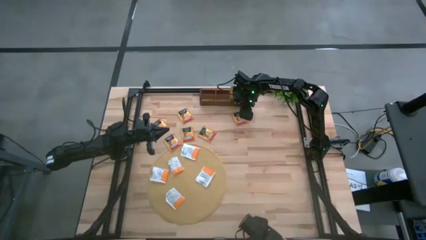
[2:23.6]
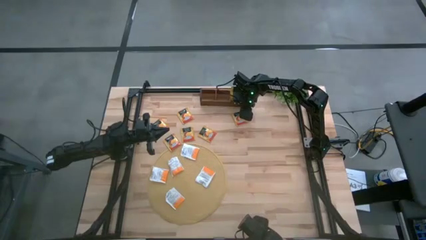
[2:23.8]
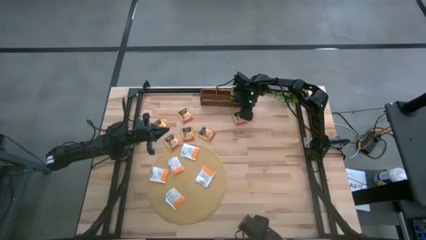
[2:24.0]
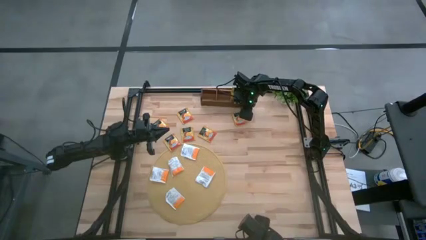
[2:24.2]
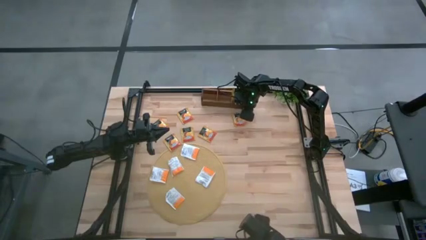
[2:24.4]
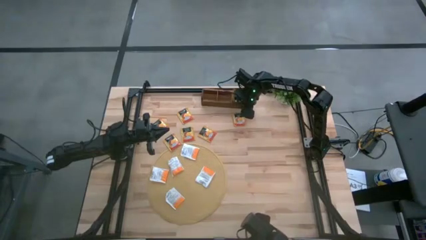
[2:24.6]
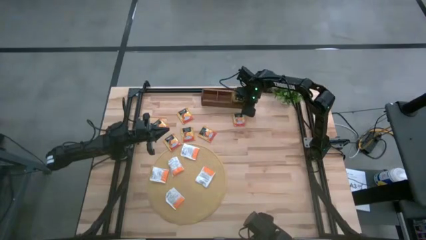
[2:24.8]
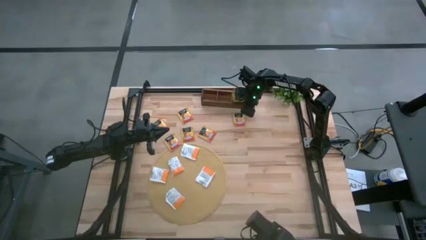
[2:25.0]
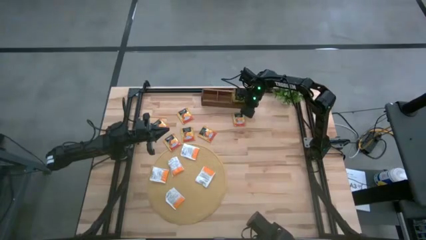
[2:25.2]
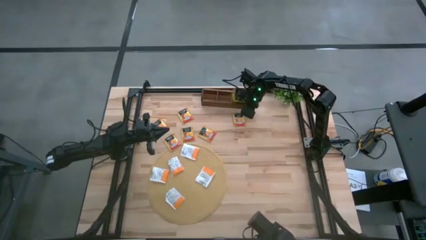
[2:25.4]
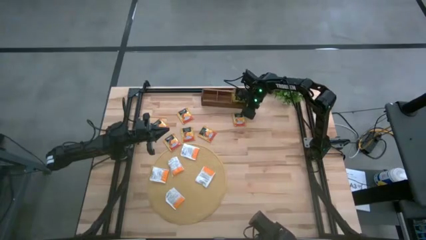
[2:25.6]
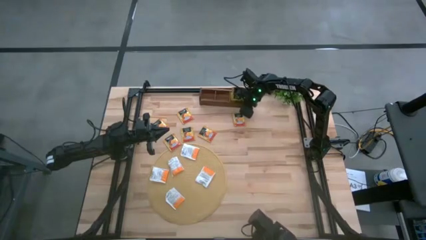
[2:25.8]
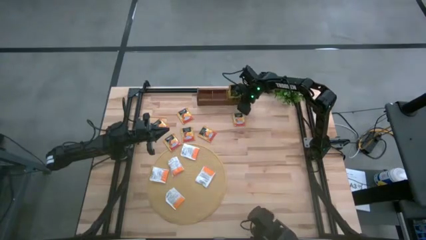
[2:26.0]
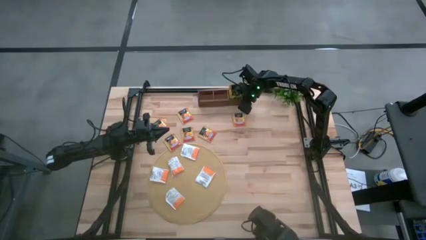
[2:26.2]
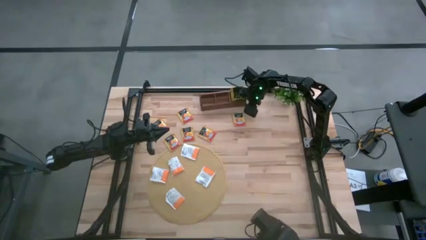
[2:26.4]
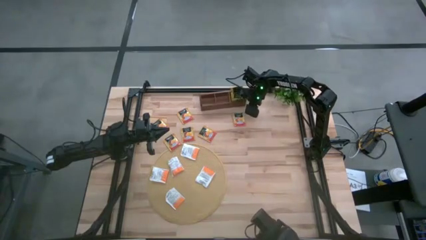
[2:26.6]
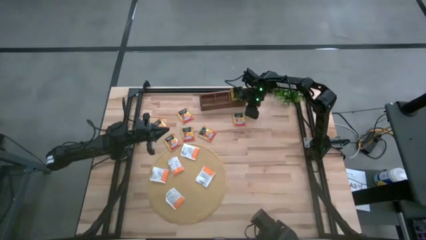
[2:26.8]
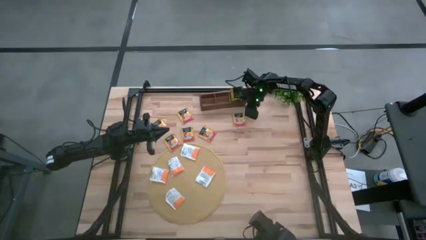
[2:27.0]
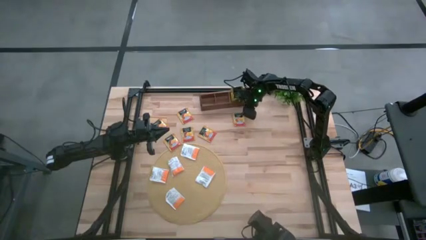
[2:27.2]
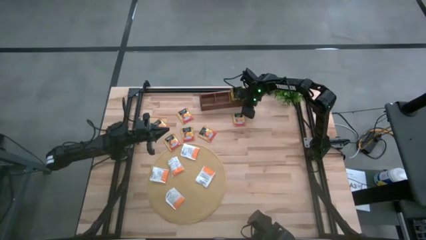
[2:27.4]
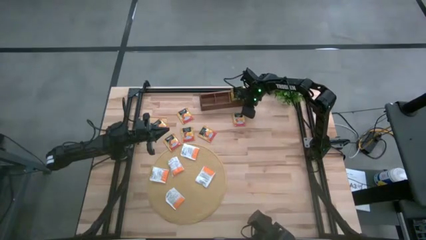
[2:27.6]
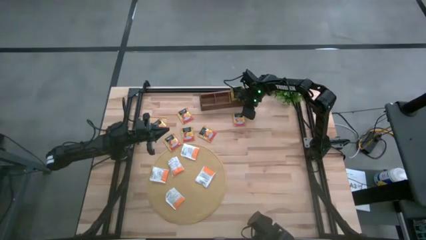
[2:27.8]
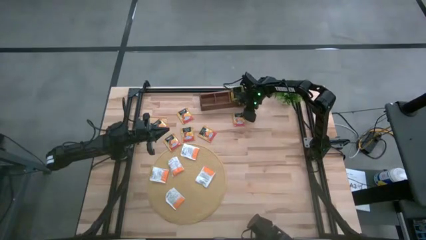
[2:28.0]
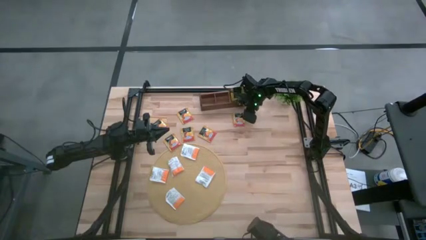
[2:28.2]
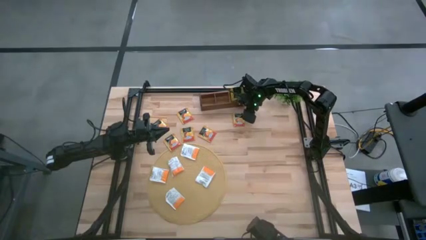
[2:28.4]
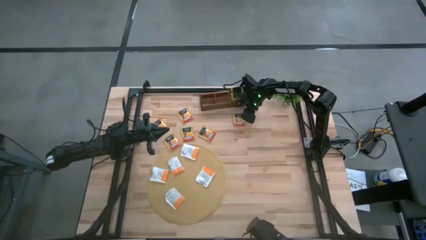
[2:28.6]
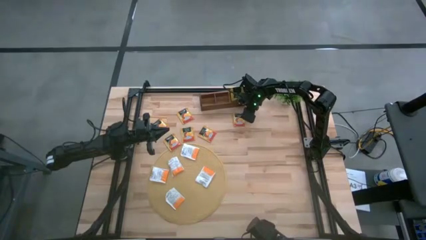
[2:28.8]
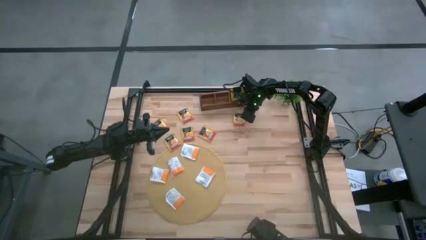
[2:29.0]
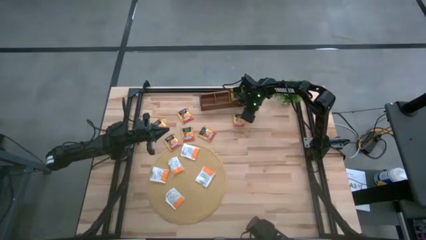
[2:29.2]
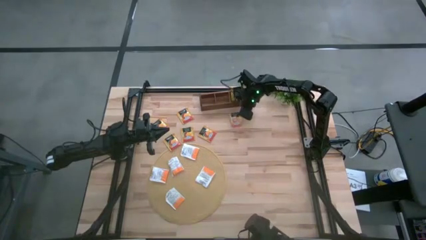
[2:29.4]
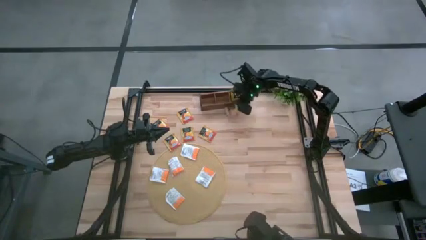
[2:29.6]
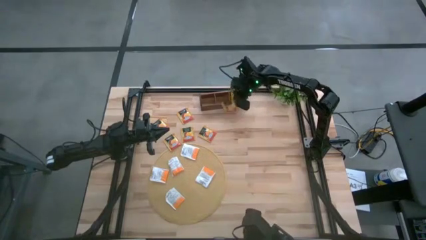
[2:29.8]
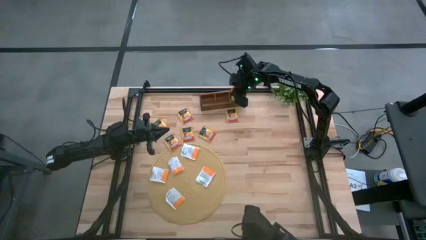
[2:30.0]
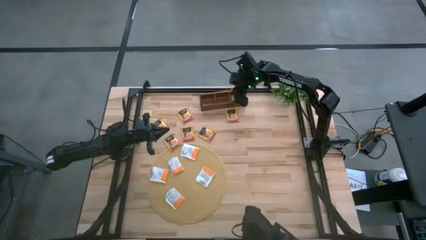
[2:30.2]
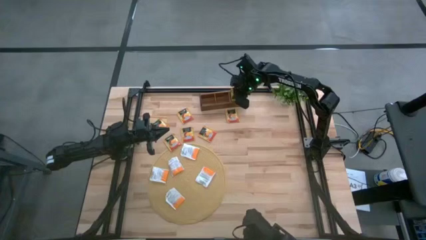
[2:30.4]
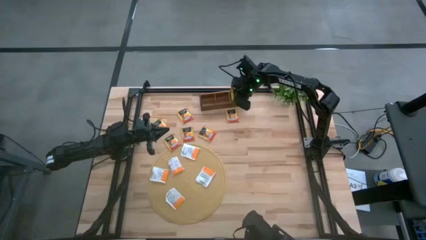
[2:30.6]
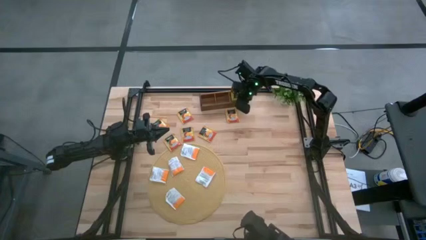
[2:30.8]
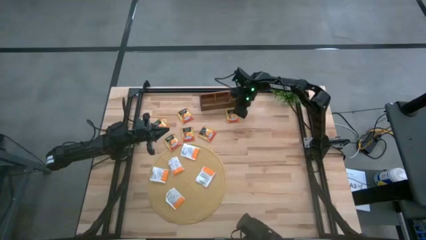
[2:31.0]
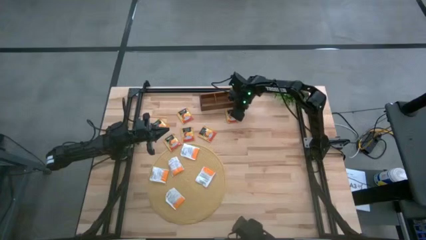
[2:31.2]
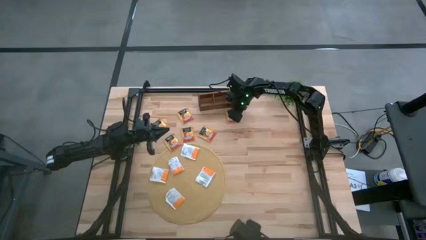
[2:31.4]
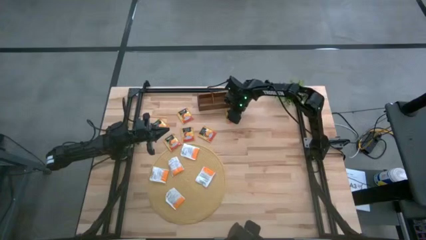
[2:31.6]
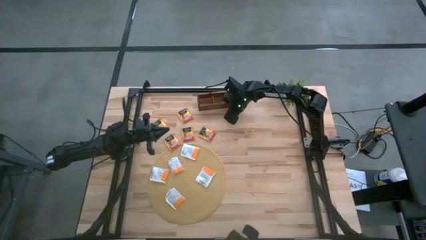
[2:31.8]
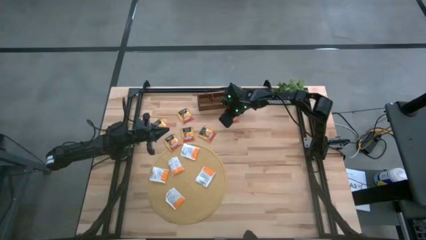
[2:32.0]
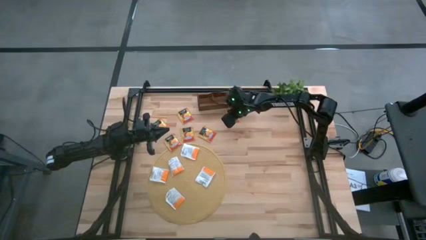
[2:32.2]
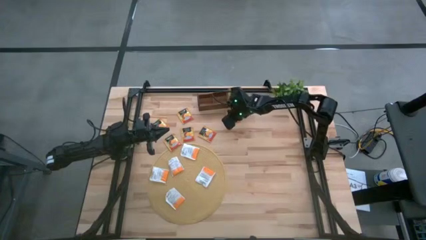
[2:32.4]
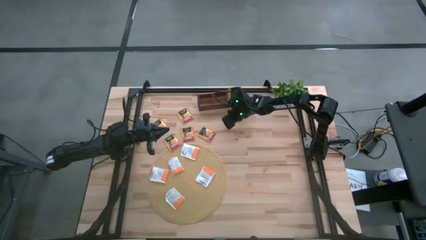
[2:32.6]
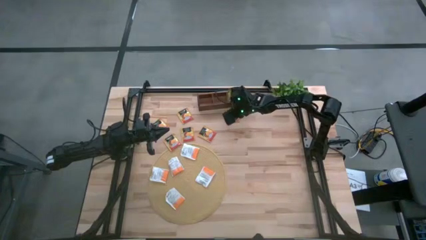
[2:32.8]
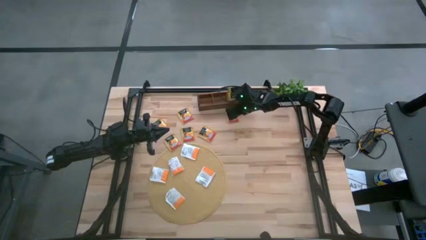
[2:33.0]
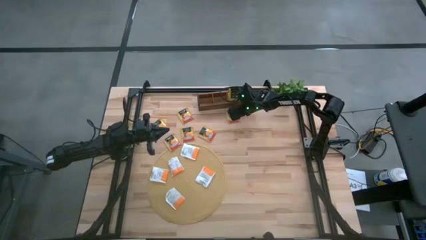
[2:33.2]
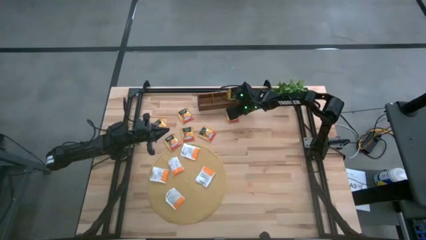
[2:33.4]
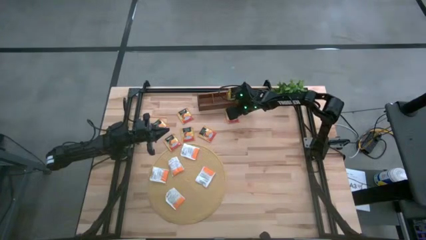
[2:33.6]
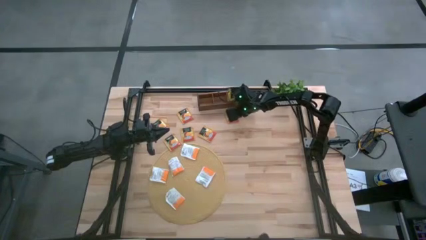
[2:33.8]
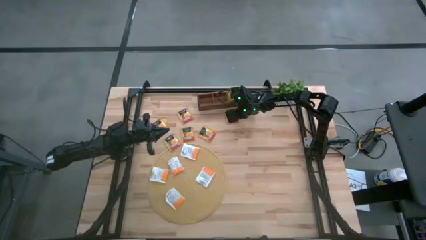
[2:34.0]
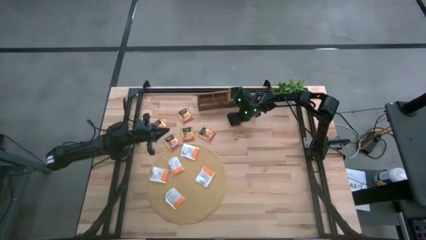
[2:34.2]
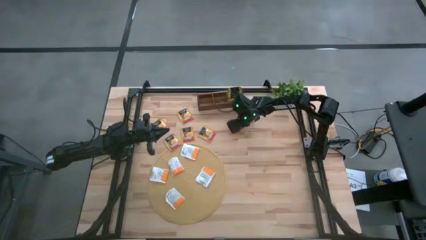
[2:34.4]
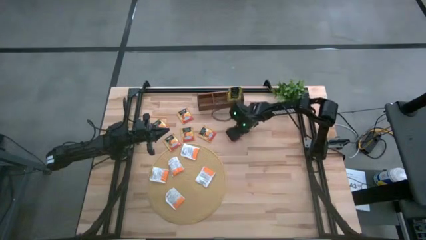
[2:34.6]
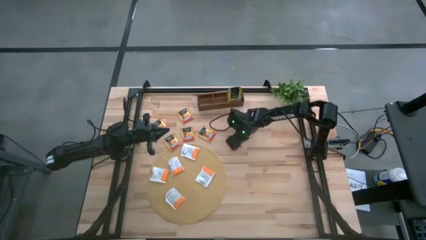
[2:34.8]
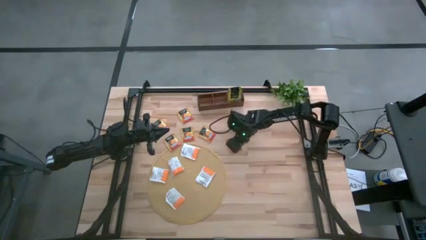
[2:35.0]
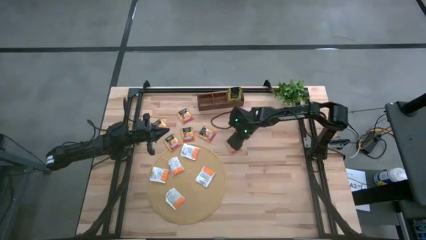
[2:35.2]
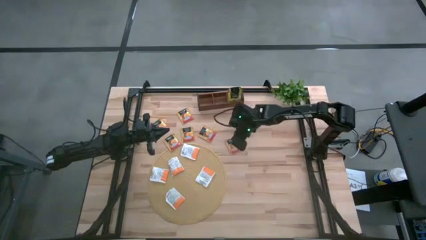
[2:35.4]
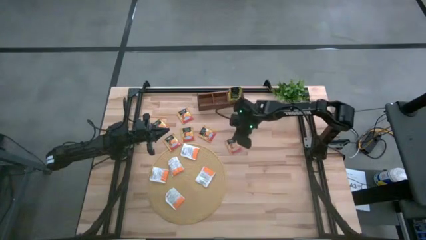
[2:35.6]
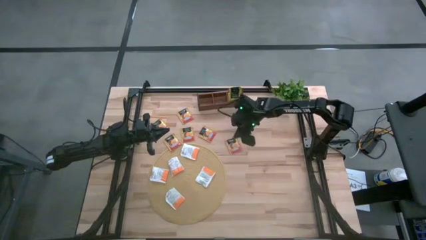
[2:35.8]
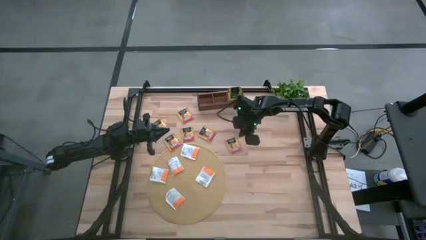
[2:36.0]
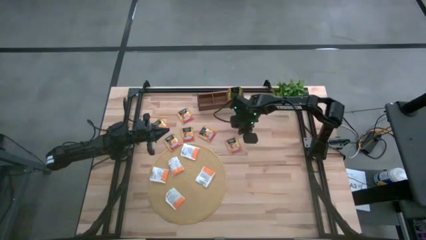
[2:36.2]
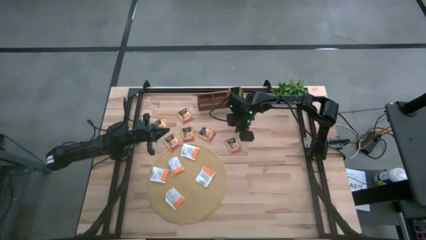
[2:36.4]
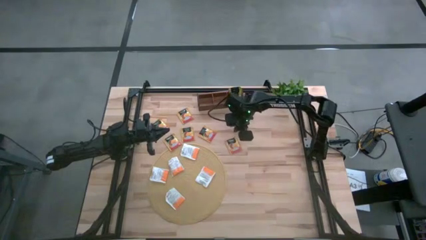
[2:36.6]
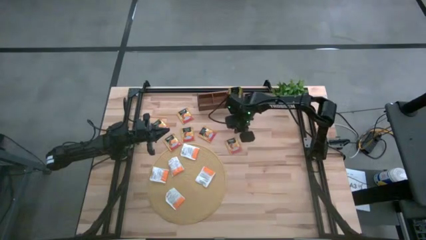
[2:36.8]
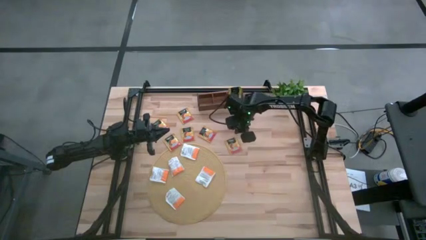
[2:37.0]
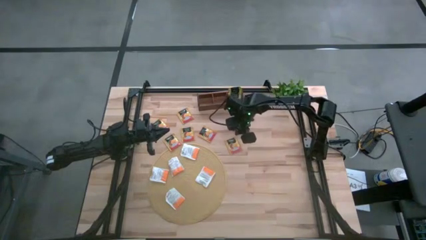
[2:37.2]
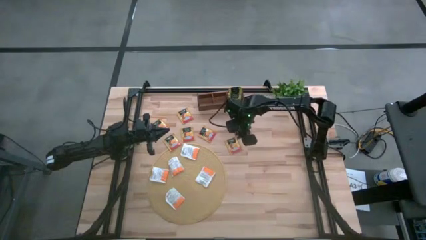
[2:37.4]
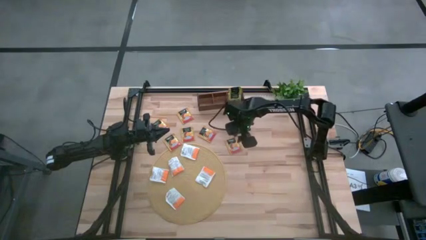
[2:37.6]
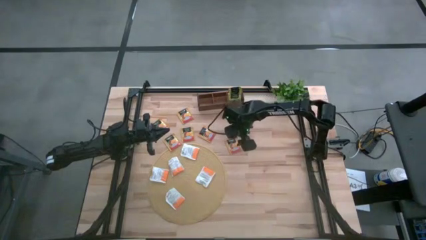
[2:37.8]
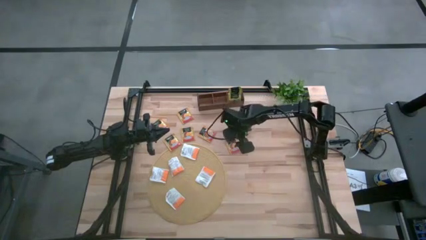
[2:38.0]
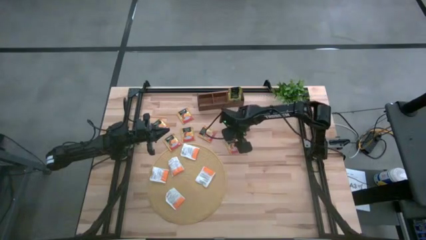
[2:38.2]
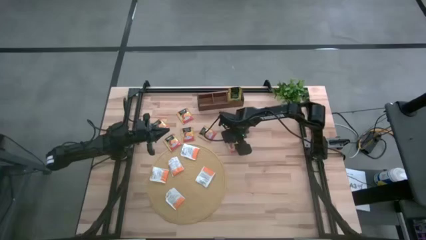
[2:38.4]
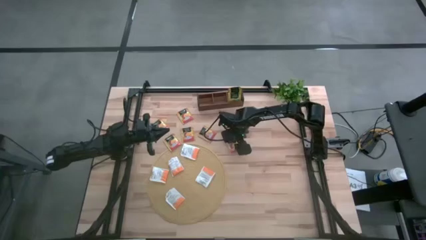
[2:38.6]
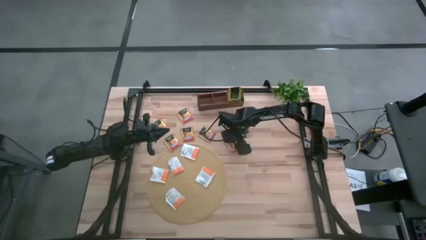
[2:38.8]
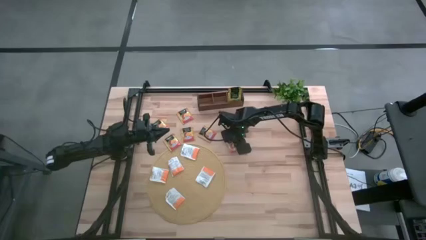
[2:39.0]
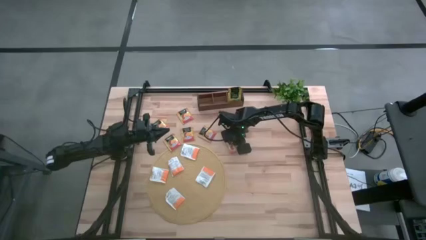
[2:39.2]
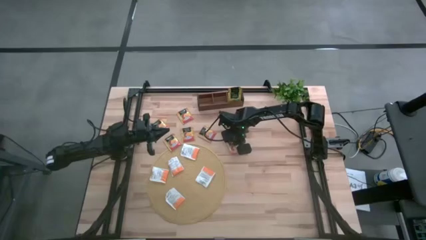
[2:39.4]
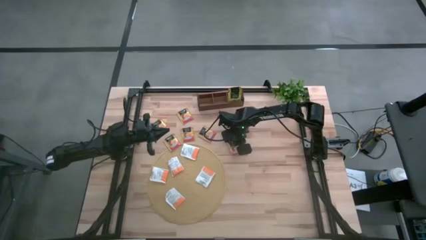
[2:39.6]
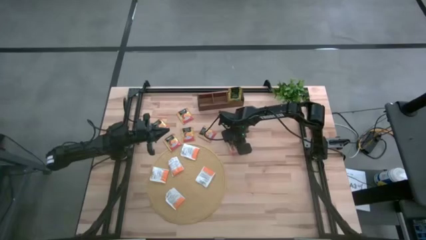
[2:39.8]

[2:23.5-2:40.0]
Task: Pick & Place Tea
Put the yellow tea bag into the middle slot of the wooden organizer
